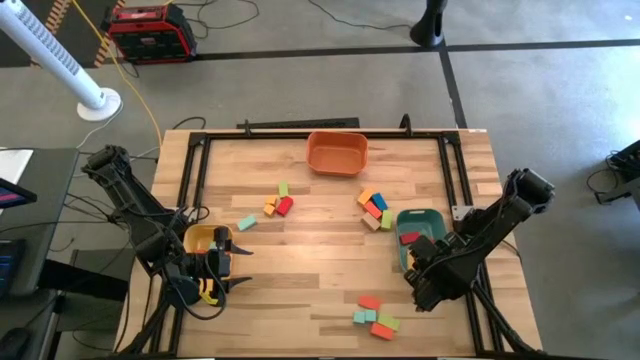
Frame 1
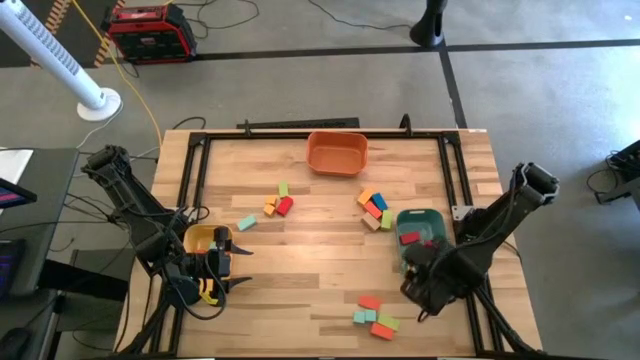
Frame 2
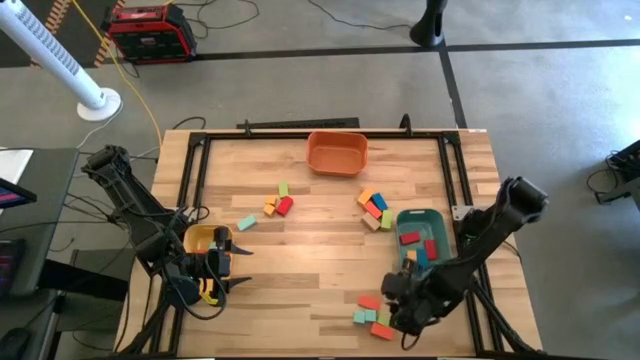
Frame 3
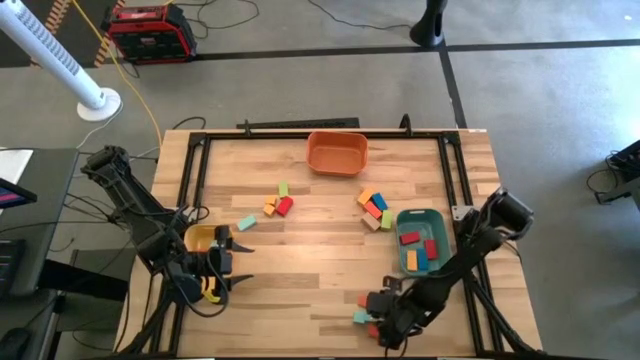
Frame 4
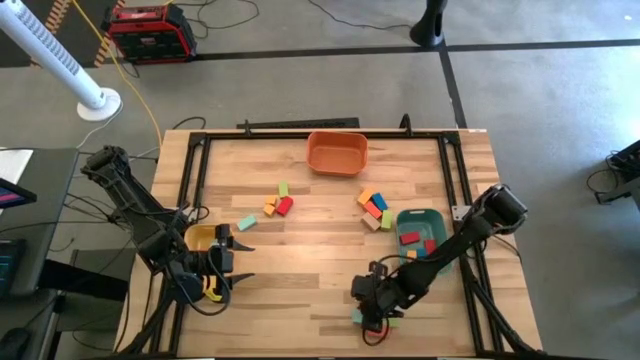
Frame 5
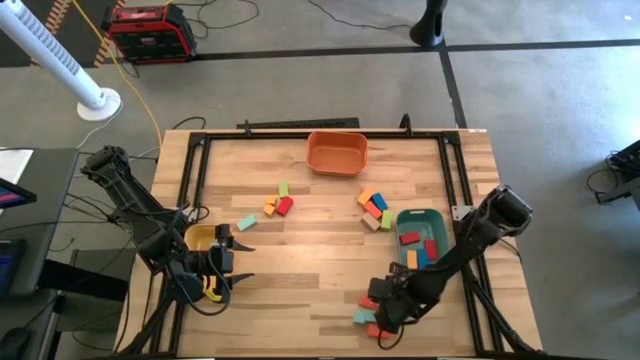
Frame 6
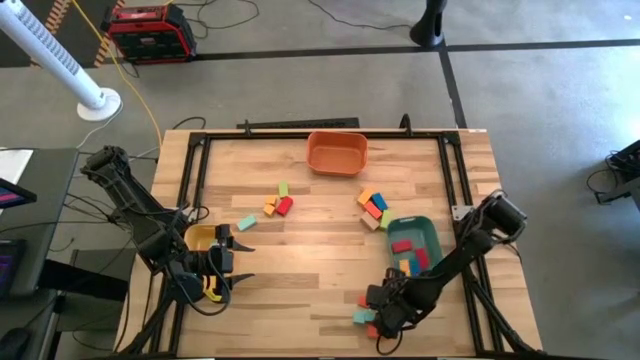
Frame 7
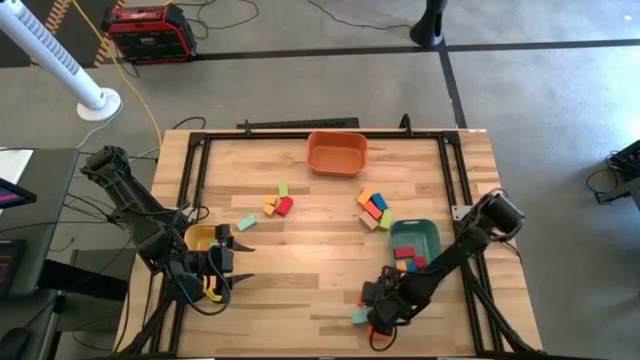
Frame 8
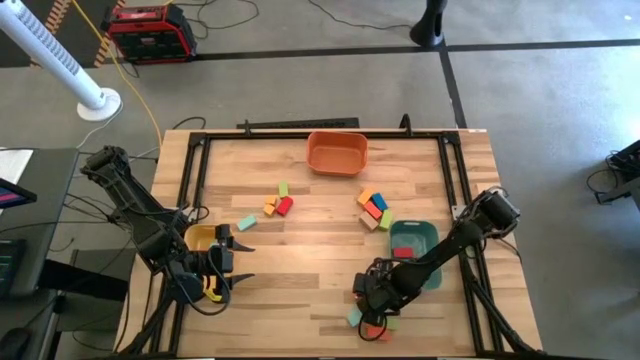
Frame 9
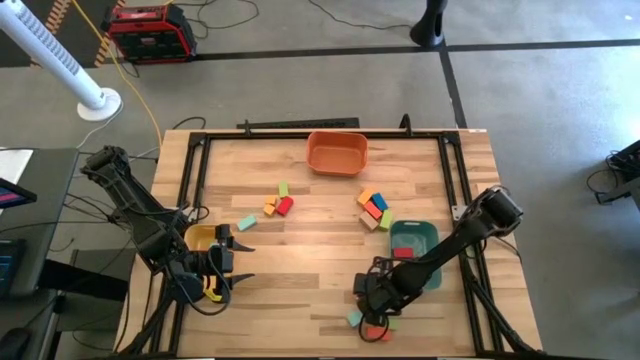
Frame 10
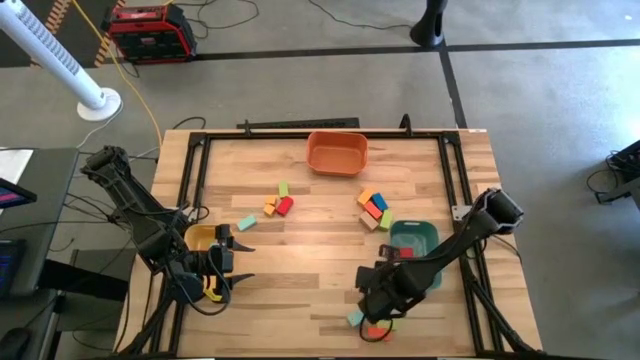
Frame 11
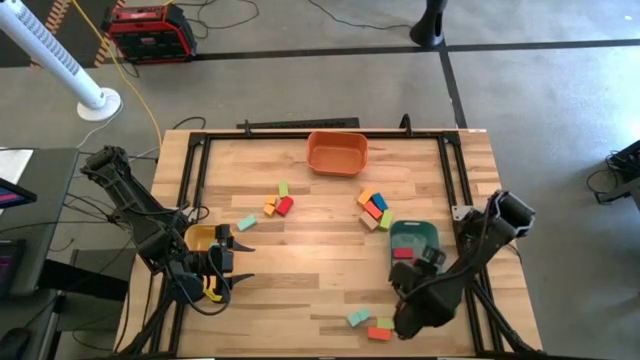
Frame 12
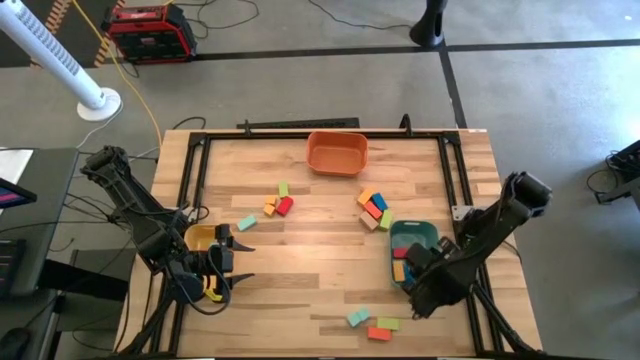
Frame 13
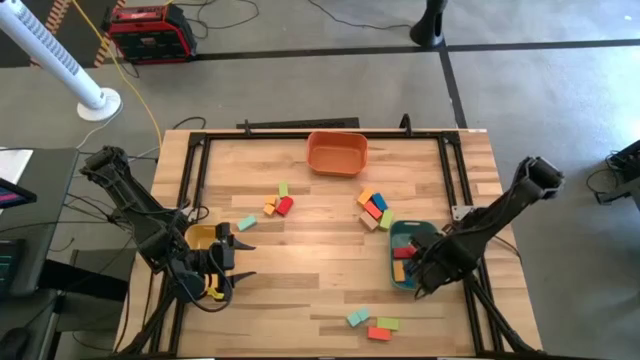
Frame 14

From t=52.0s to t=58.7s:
Task: Sort blocks by size
Put the medium orange block into the green bin

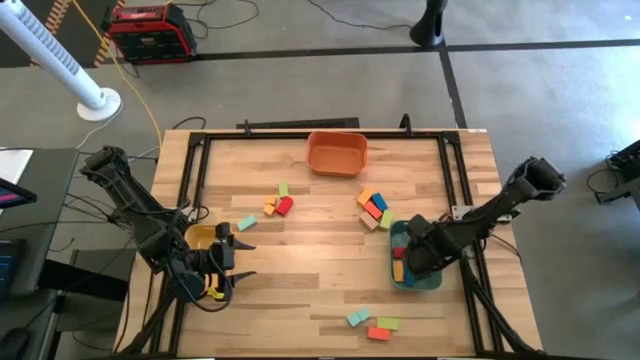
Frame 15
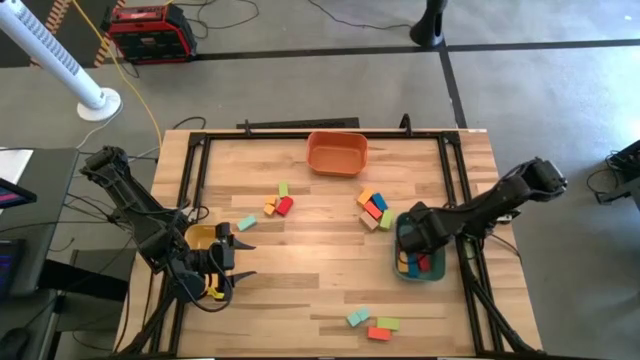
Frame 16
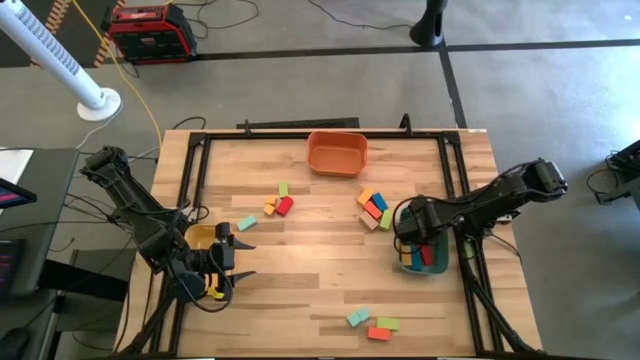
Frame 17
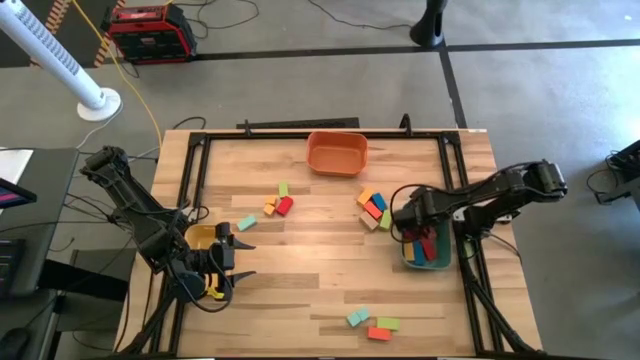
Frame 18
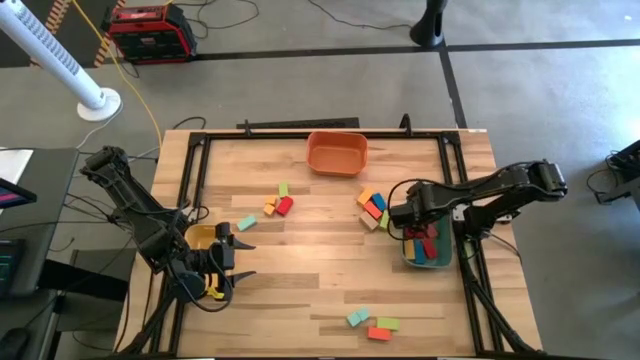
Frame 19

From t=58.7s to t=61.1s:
Adjust the green bin

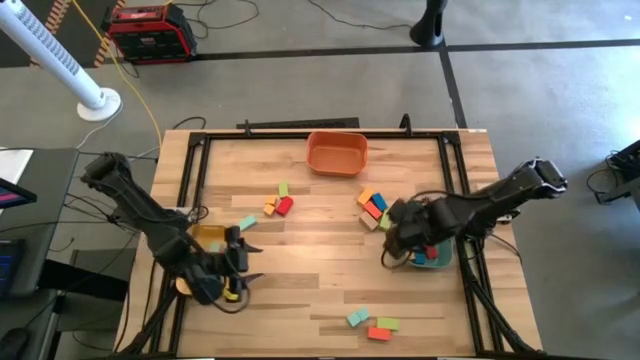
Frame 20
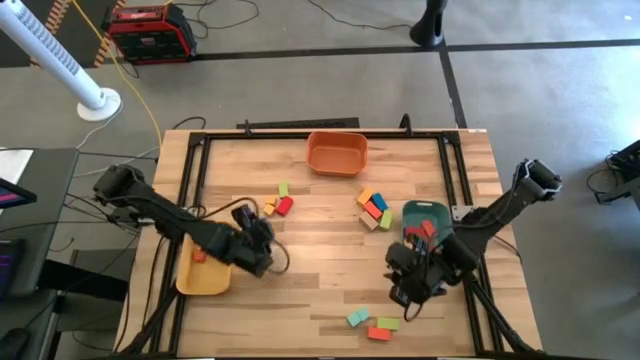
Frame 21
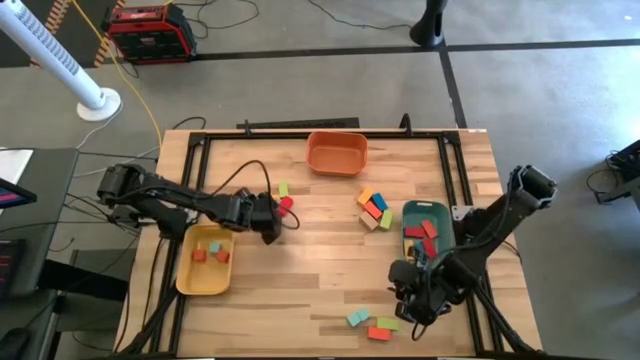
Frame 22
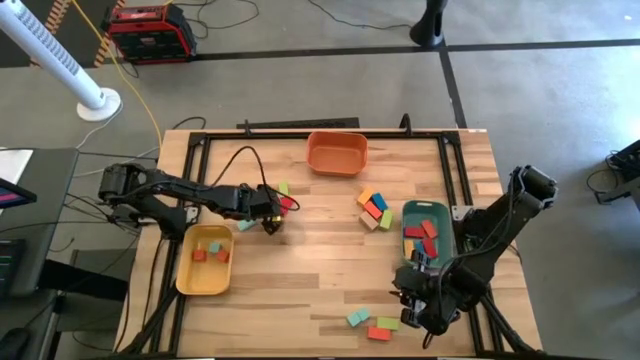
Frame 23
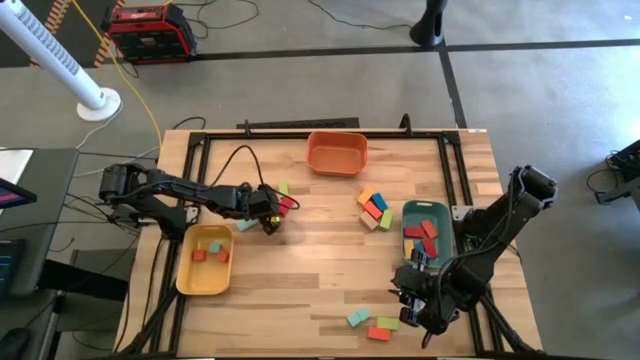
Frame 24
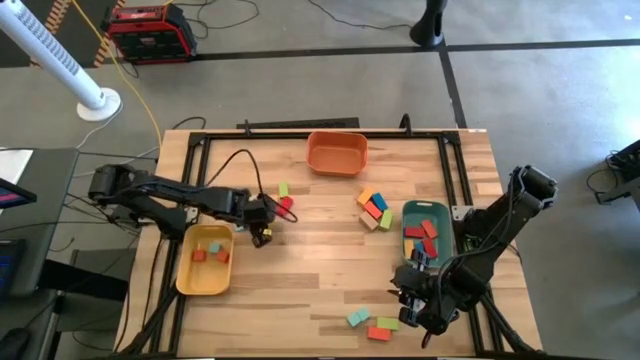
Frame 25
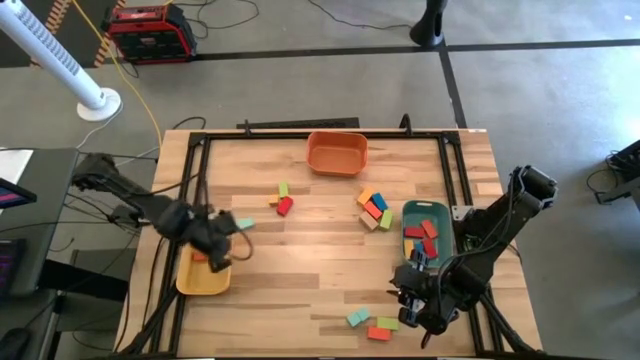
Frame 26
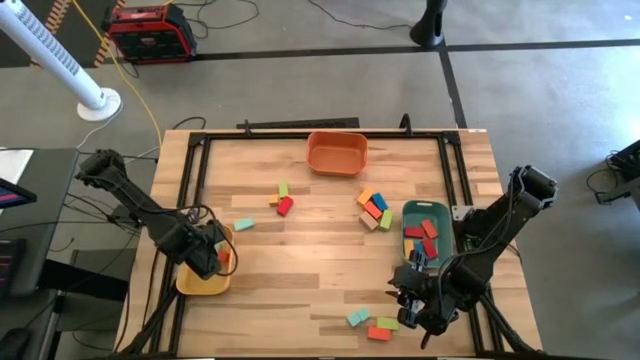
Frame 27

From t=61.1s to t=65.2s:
Put the small yellow block into the yellow bin

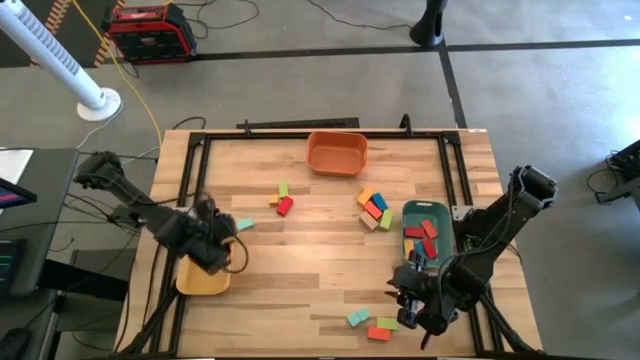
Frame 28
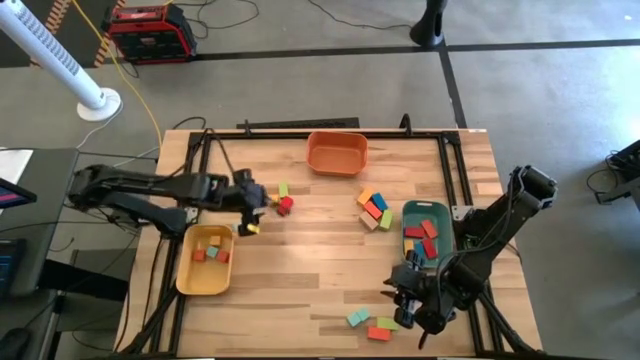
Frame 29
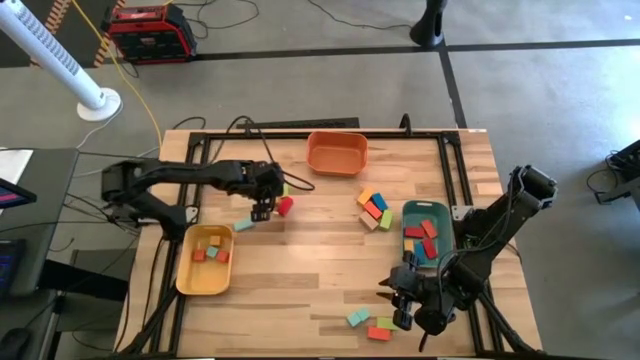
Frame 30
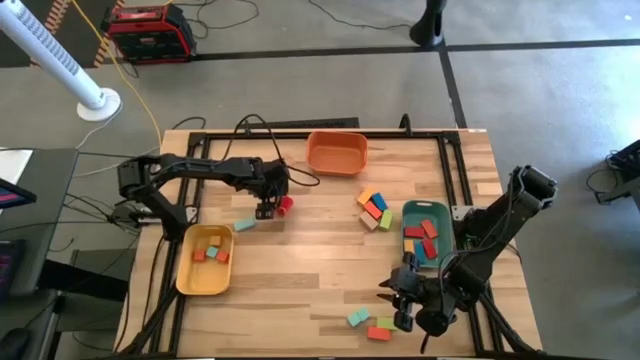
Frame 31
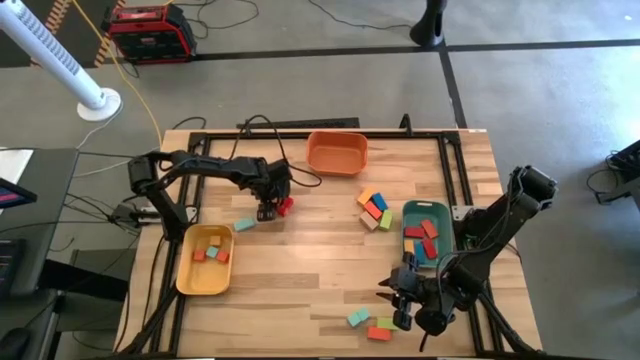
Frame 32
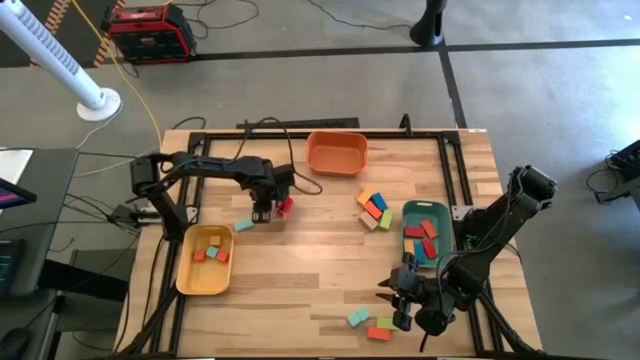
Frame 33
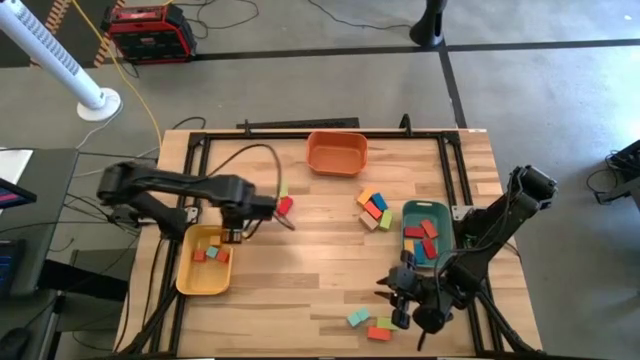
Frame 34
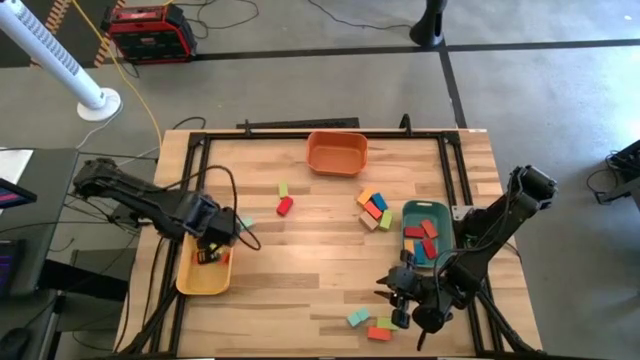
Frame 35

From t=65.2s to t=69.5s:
Put the small yellow block into the yellow bin

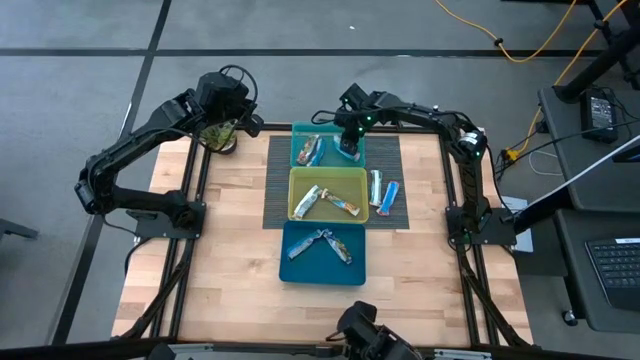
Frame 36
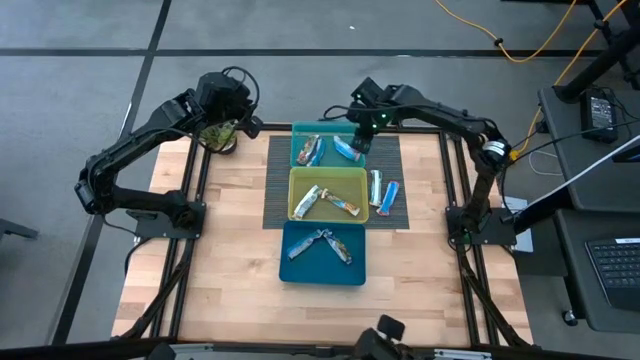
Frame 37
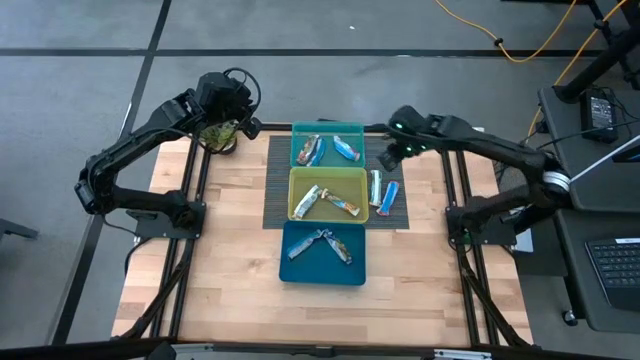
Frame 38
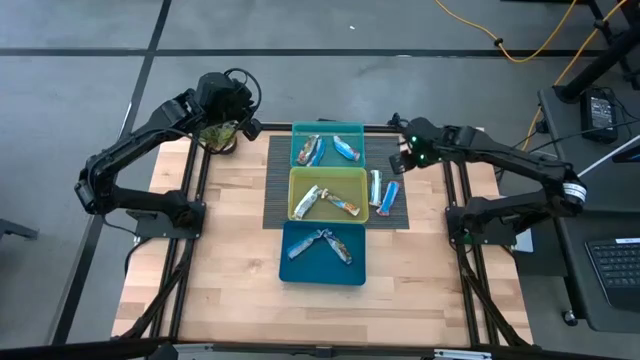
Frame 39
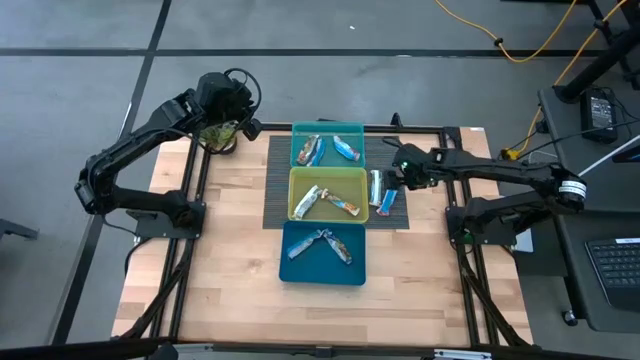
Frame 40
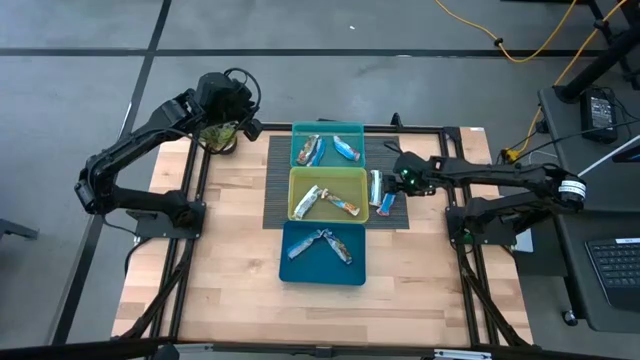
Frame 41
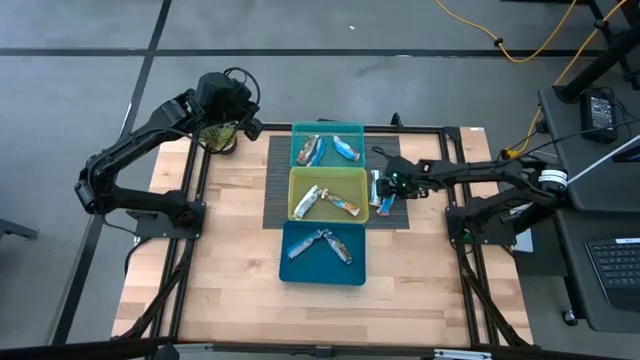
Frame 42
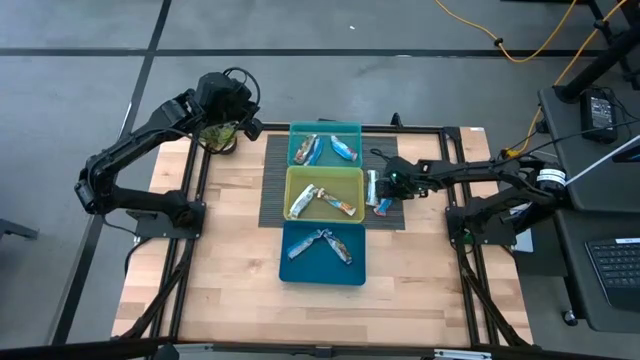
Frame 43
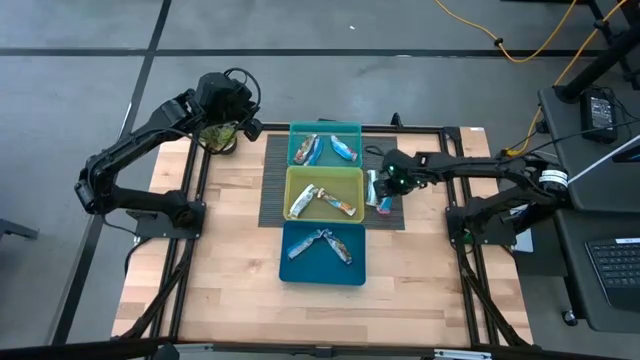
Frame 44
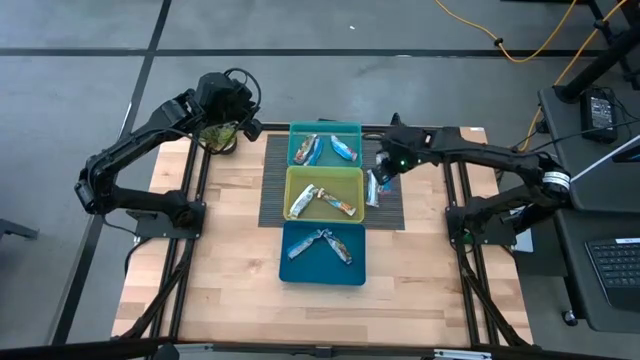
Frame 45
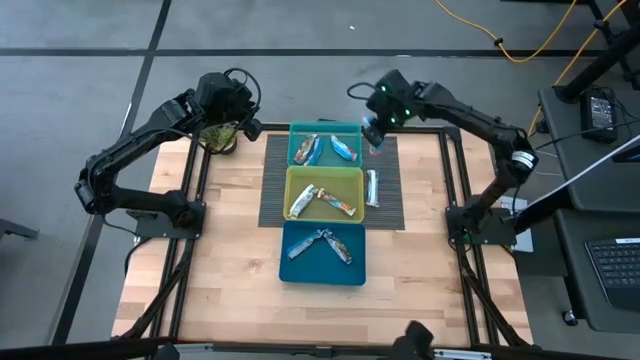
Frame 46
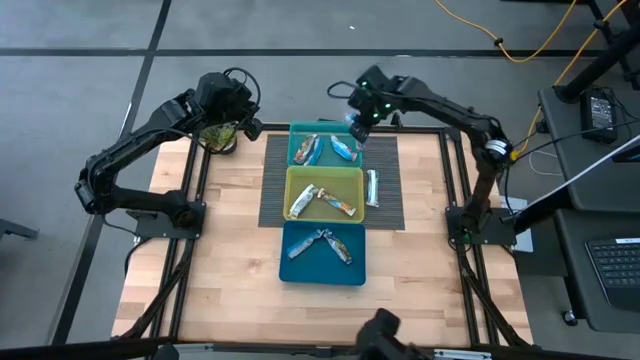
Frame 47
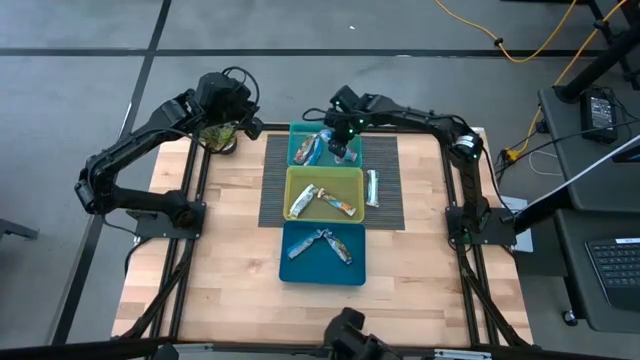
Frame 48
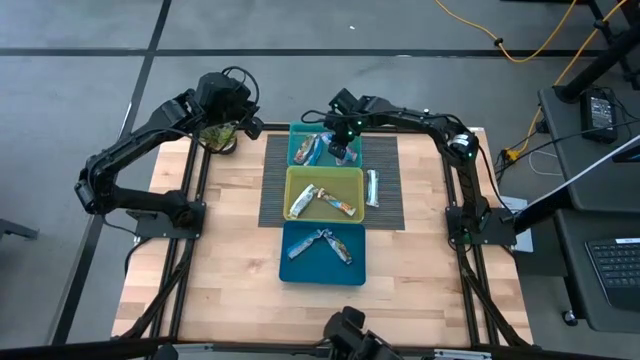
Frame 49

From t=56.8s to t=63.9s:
Task: Pick and place Granola Bars by type
Put the red granola bar into the green bin
